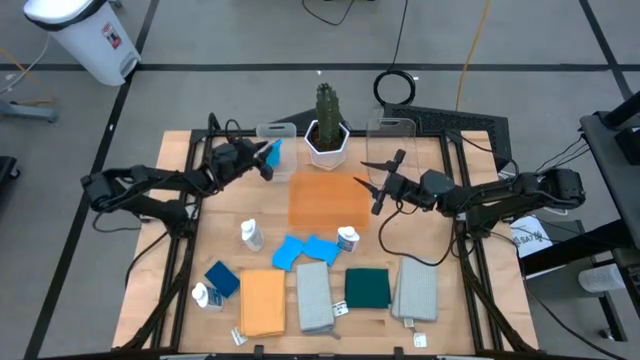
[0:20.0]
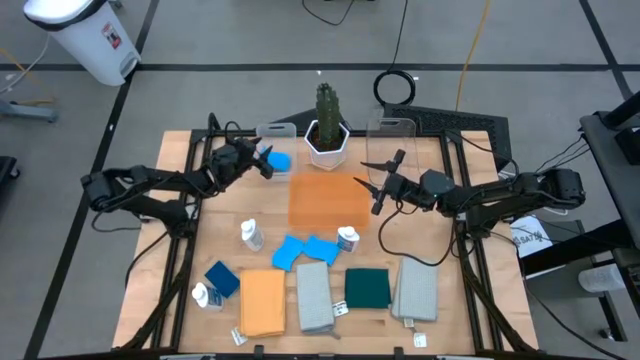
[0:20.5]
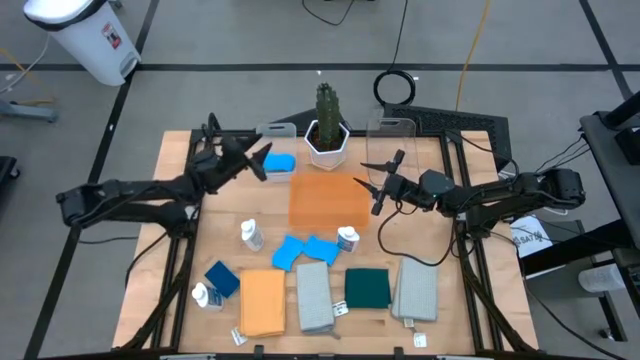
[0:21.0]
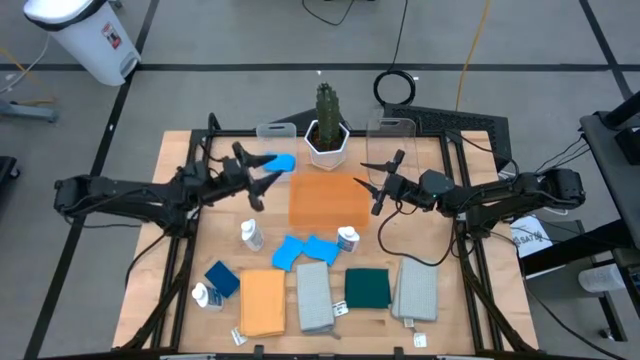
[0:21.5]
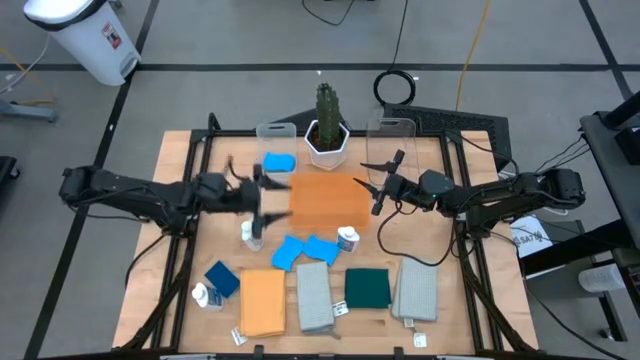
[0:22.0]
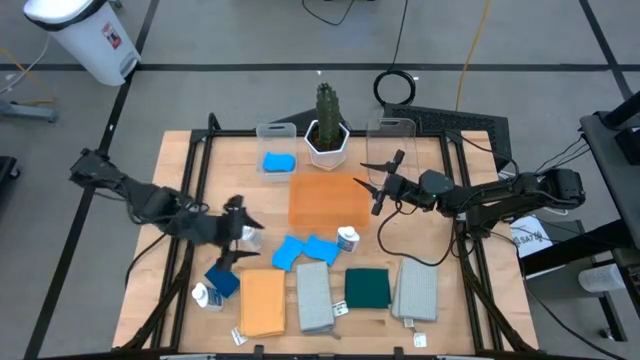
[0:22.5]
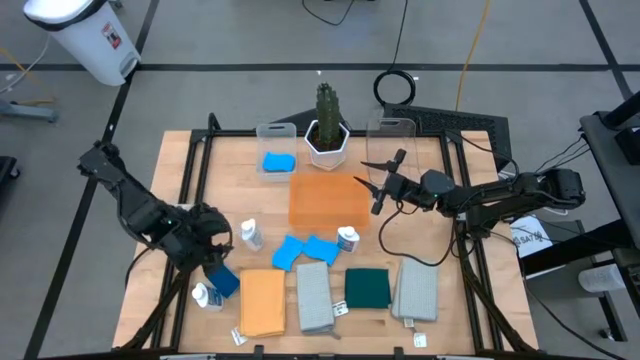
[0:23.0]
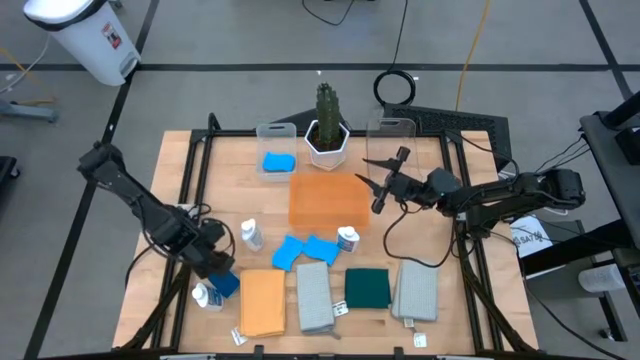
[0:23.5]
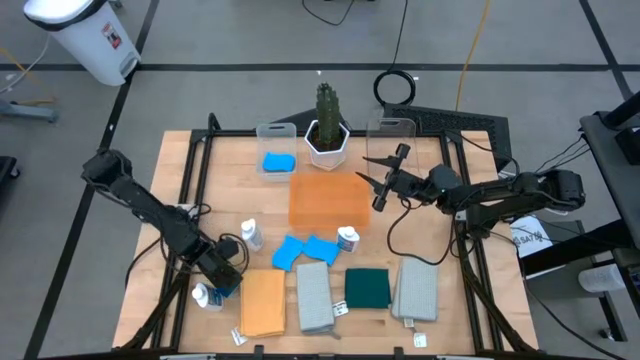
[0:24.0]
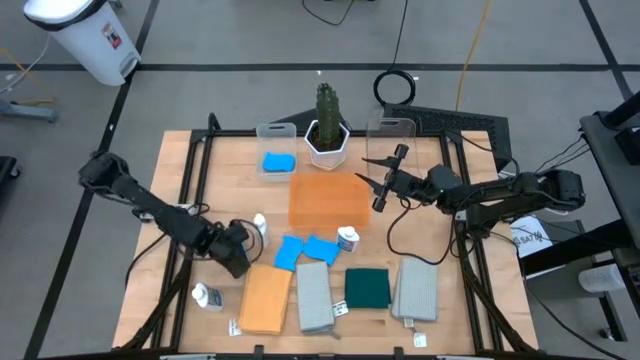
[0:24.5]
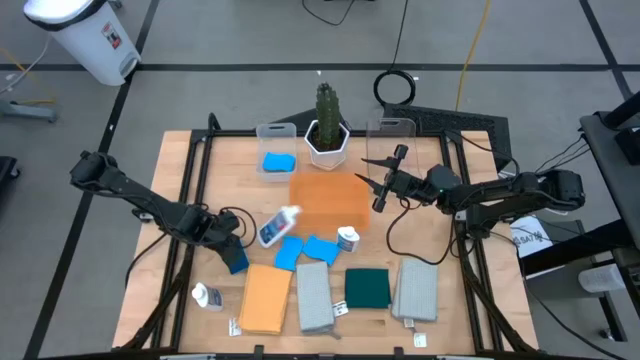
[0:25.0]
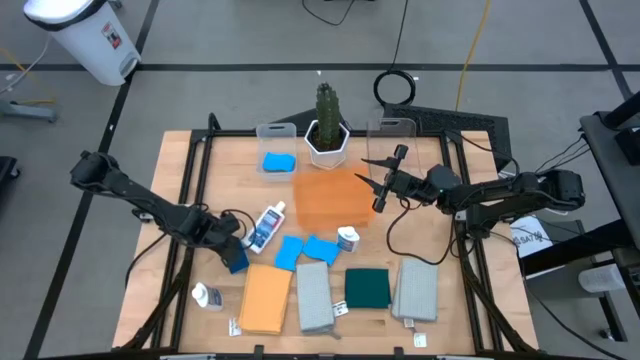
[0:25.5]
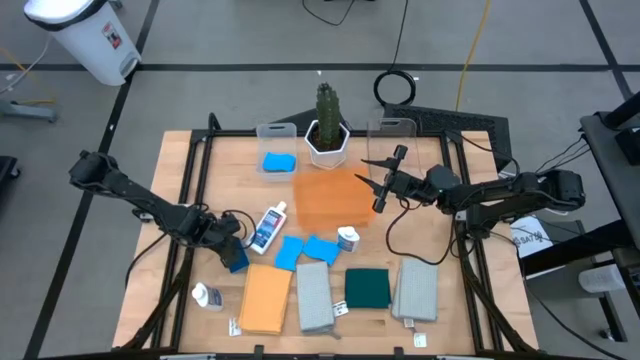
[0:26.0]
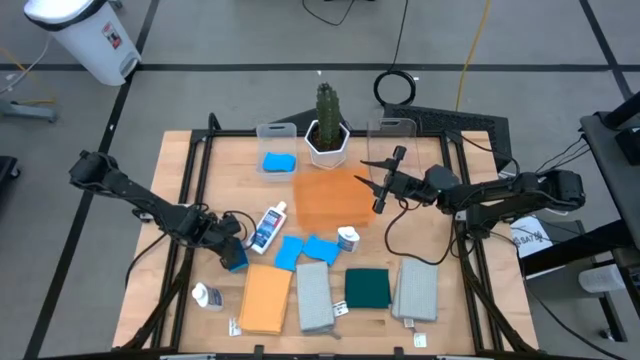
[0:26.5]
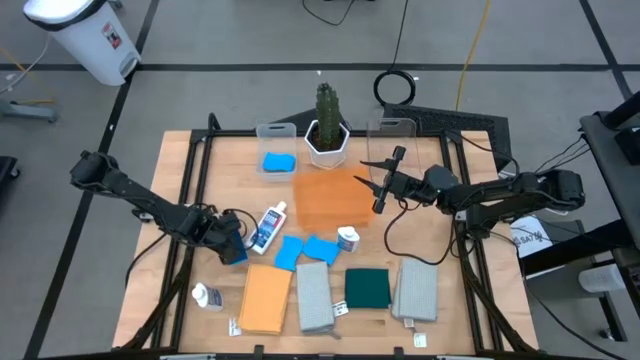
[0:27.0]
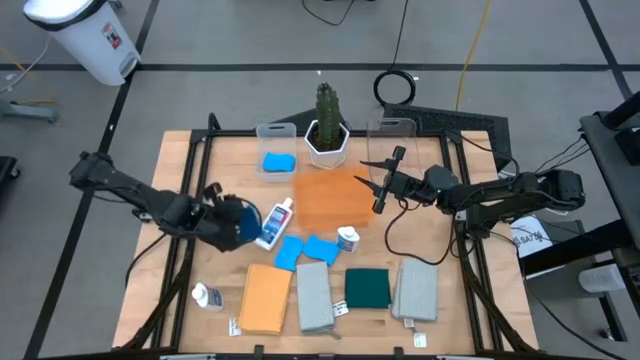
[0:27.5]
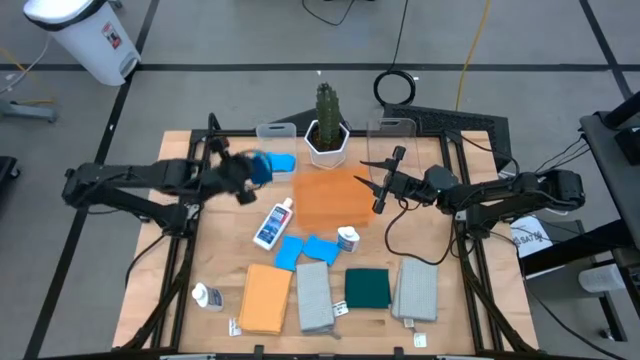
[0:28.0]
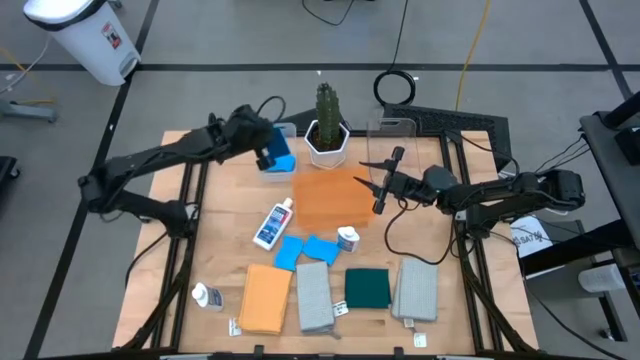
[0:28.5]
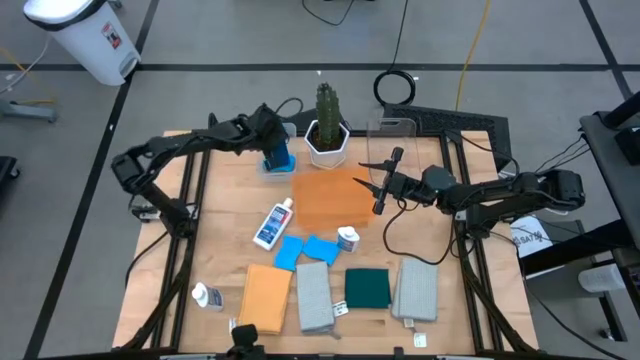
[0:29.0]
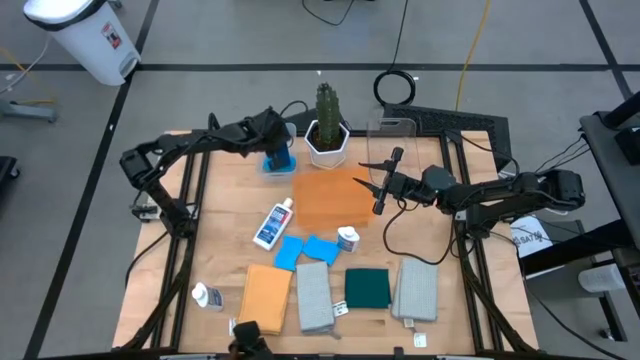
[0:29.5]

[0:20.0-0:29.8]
Task: Pick & Place Kitchen Items
Put the blue sponge into the white bin

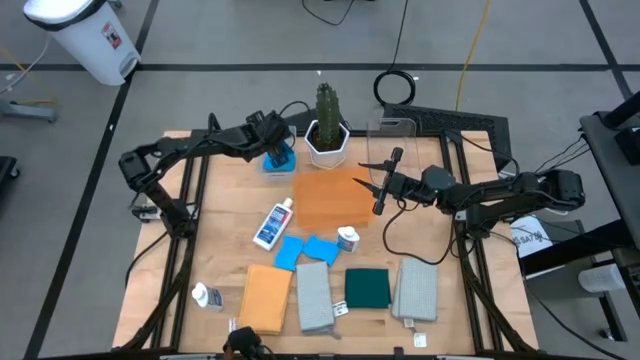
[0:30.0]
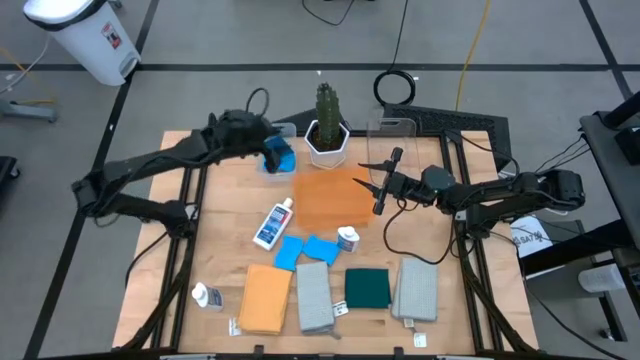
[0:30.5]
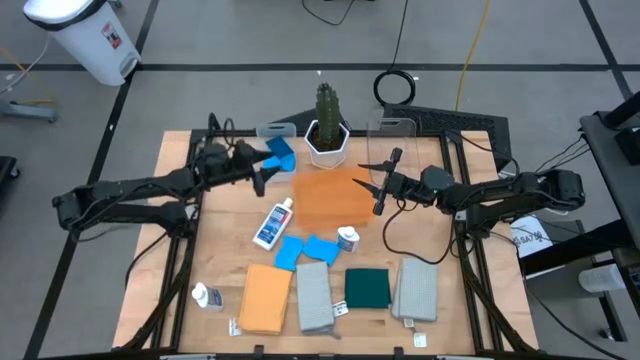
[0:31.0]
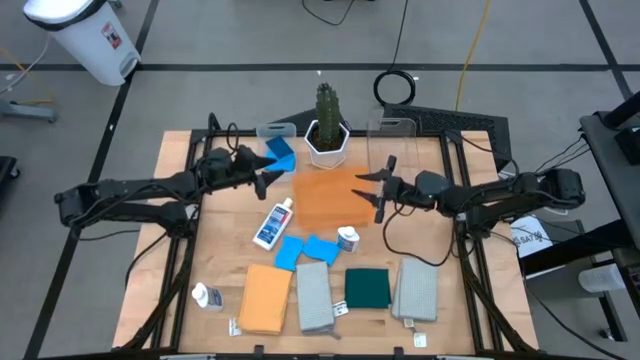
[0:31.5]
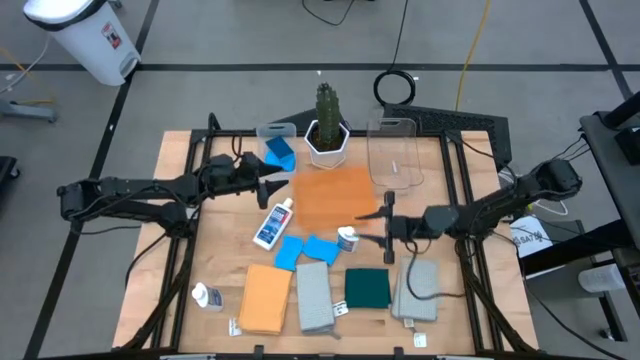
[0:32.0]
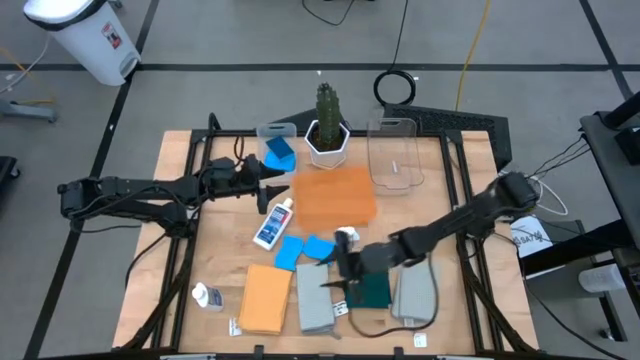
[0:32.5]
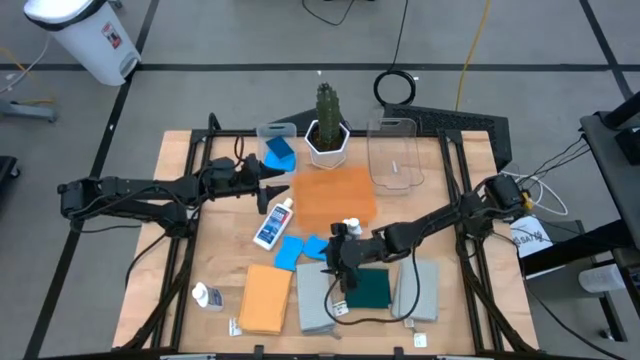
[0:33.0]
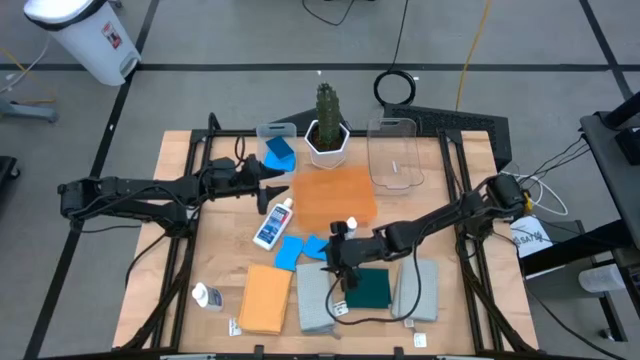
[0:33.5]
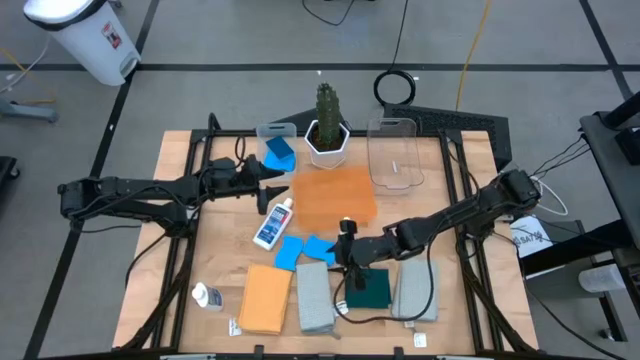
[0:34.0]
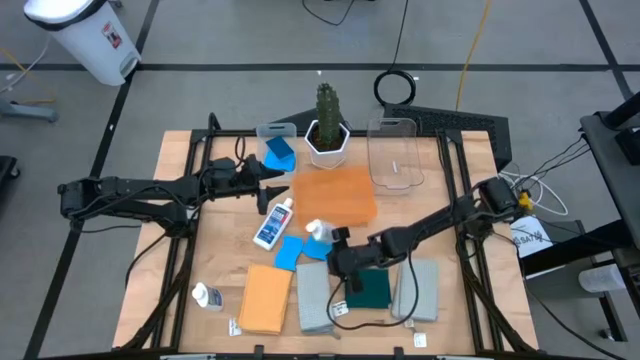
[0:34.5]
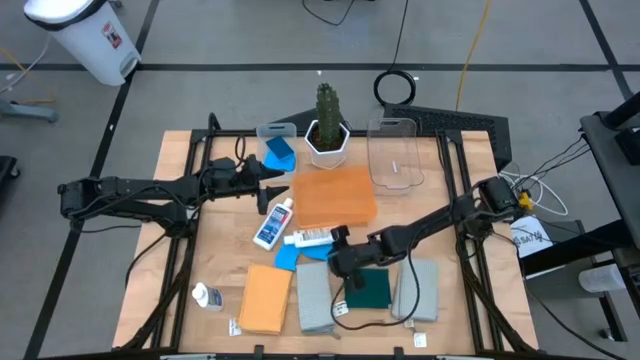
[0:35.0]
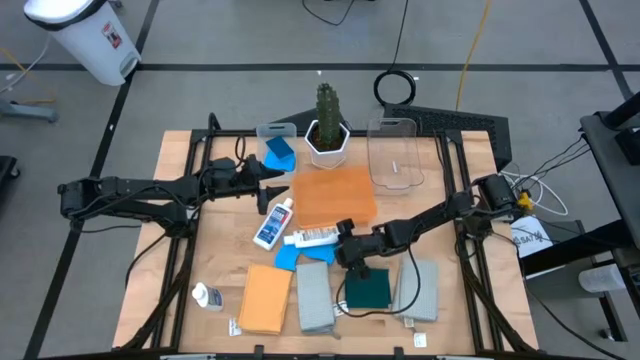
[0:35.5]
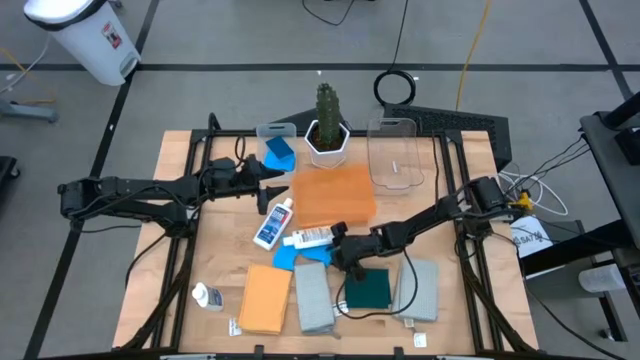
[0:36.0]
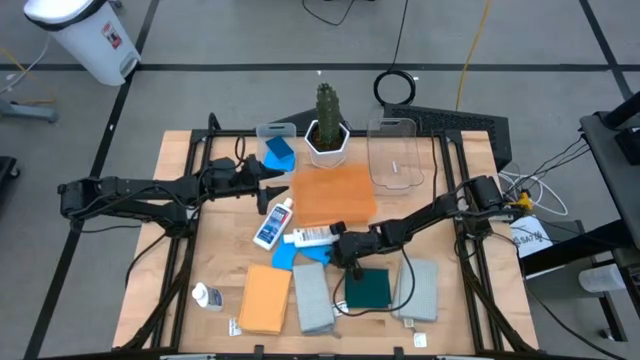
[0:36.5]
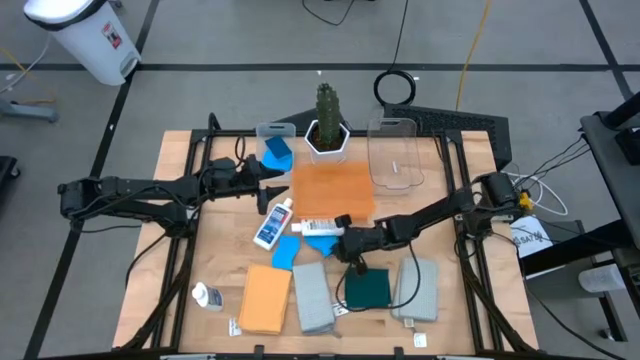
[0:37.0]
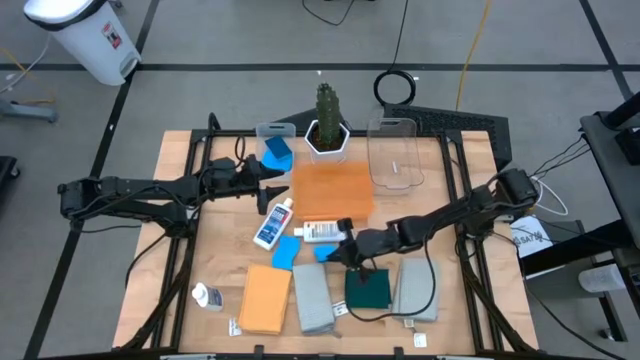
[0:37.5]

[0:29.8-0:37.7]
Put the blue sponge into the white bin

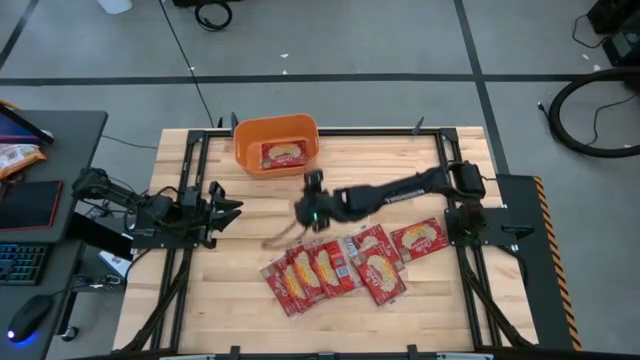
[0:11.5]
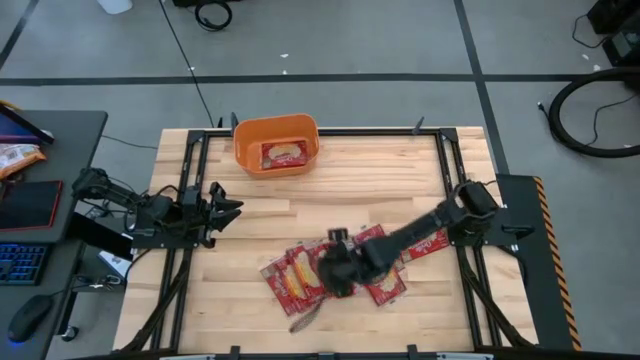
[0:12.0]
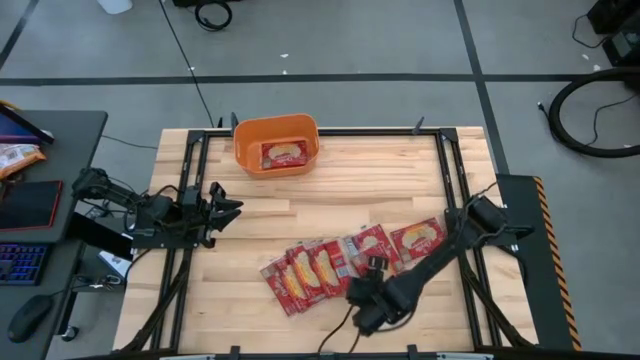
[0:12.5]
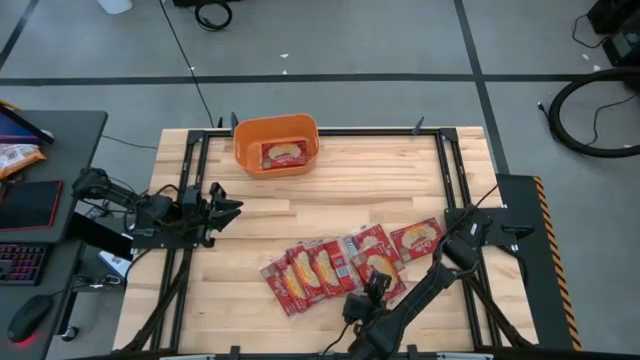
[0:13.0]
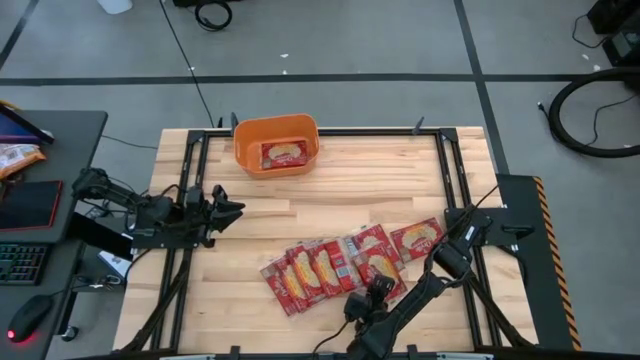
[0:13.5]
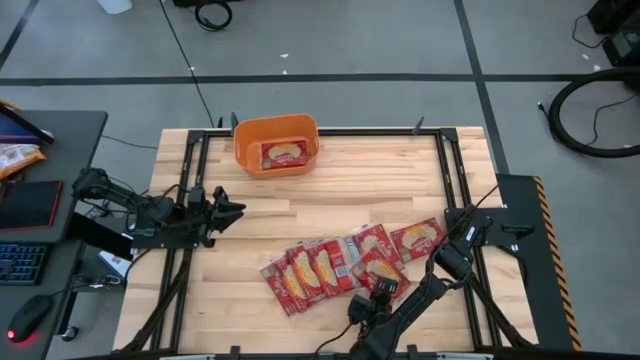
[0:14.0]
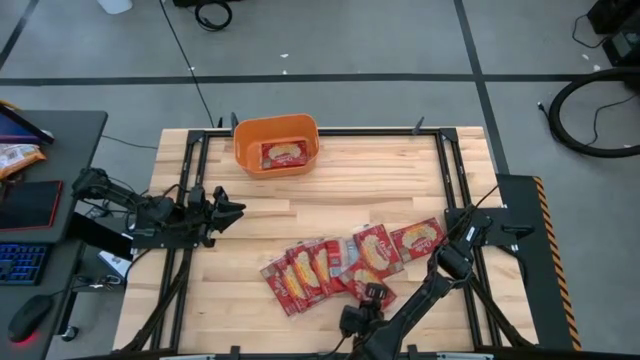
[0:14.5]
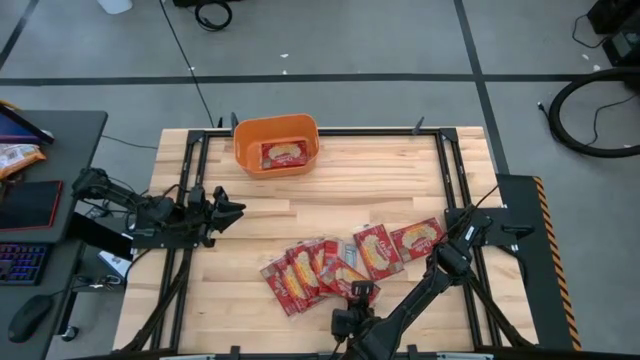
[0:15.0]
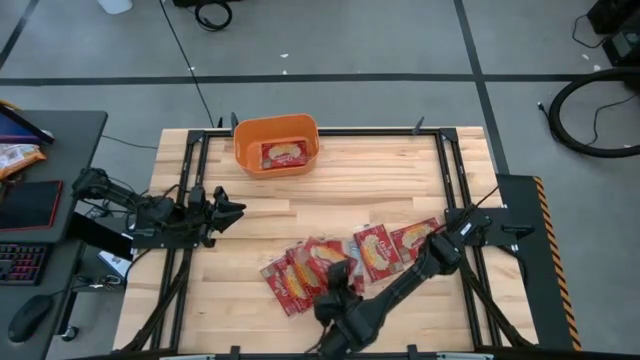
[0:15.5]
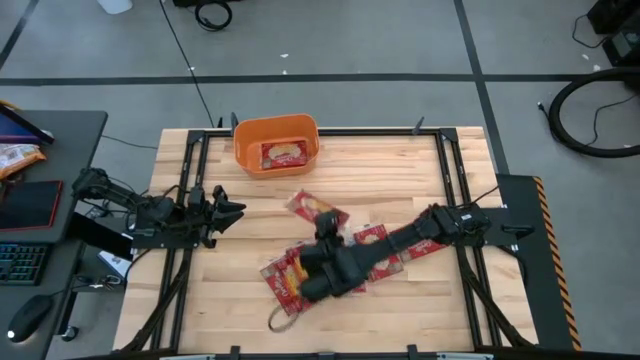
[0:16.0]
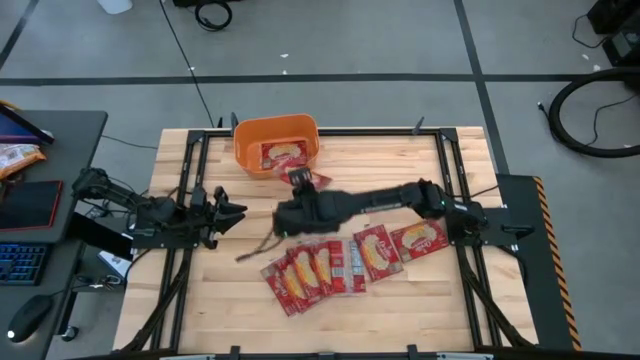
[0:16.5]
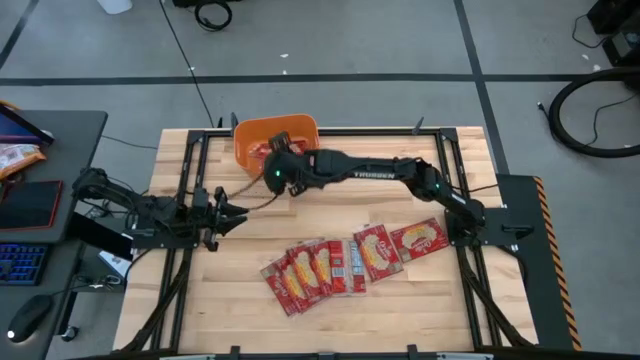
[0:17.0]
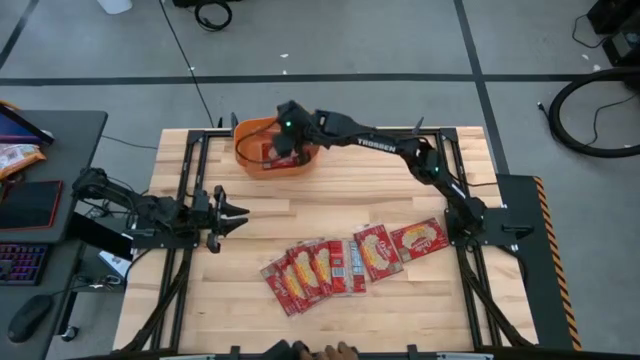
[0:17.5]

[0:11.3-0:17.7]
Task: Sort popcorn bags into baskets
Put the red popcorn bag into the orange bin
